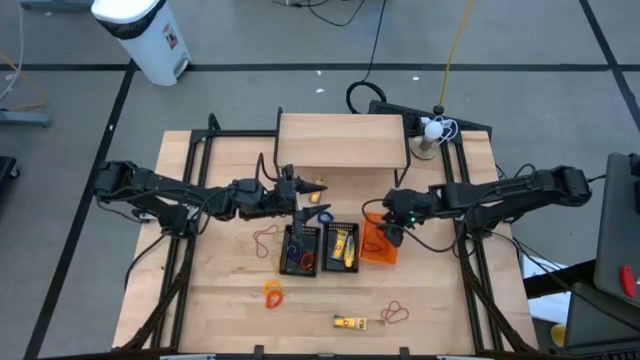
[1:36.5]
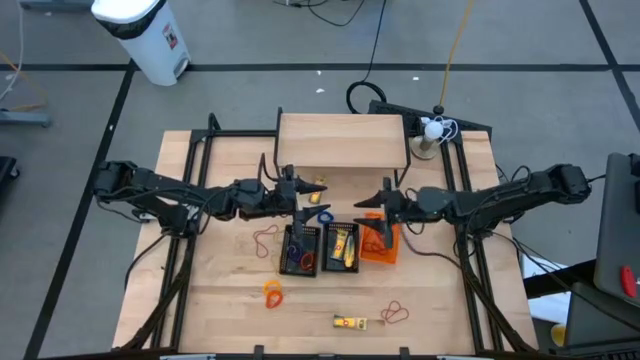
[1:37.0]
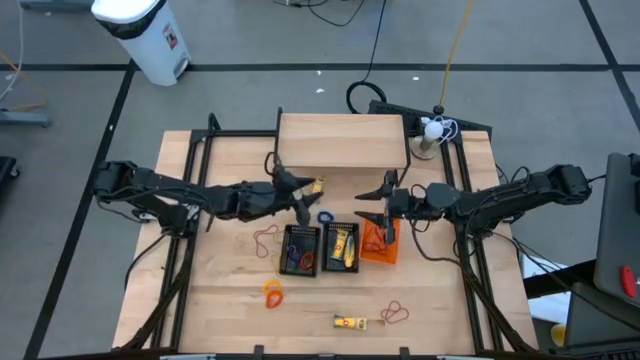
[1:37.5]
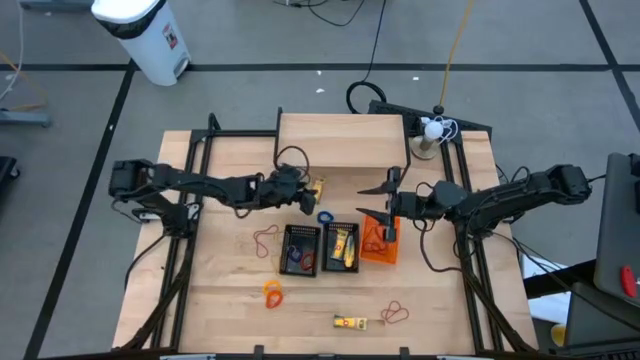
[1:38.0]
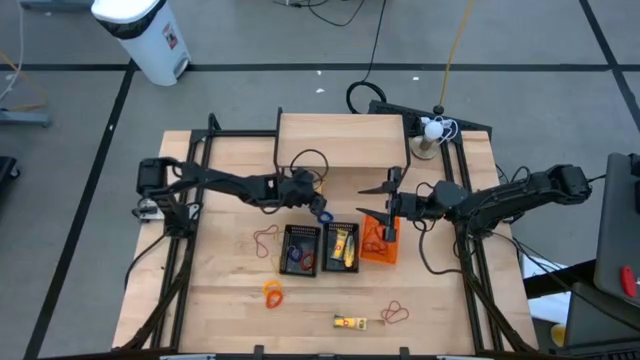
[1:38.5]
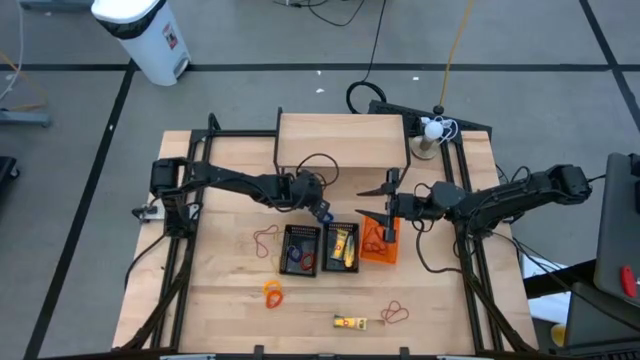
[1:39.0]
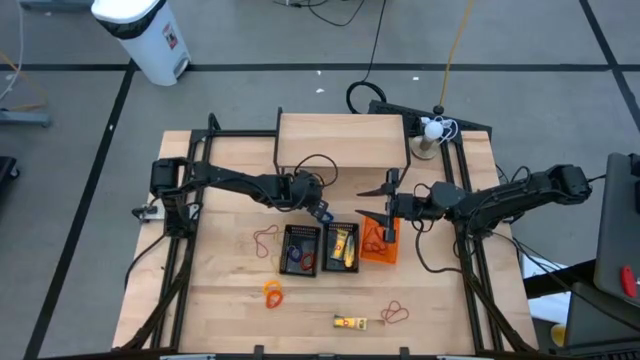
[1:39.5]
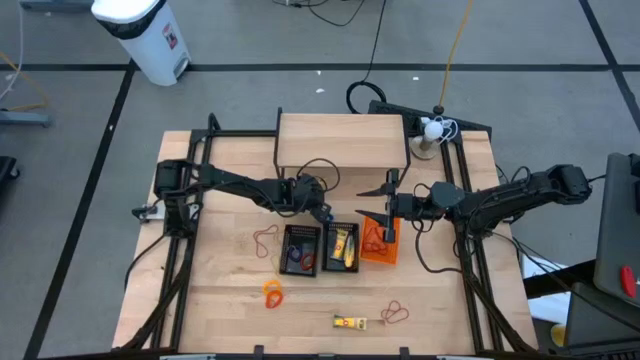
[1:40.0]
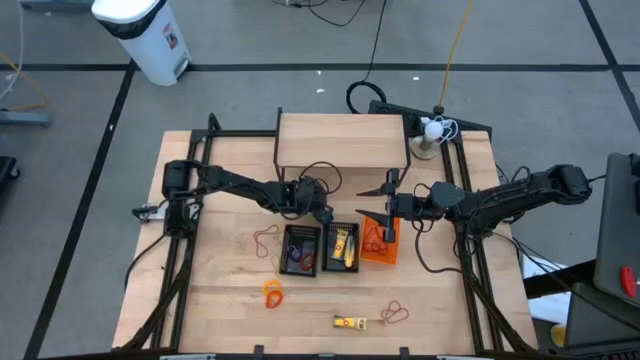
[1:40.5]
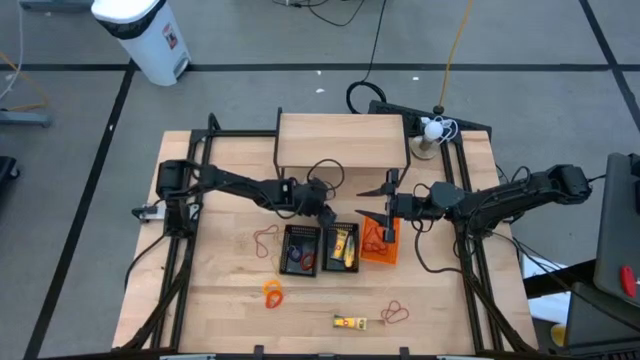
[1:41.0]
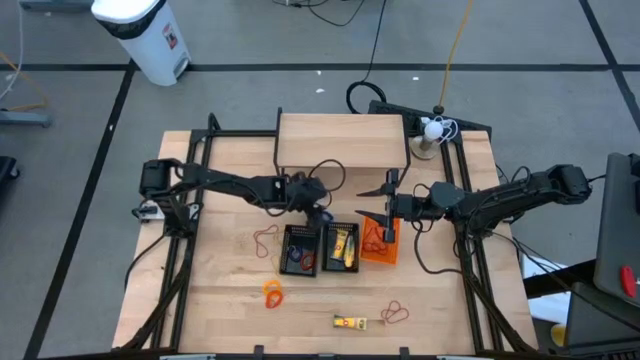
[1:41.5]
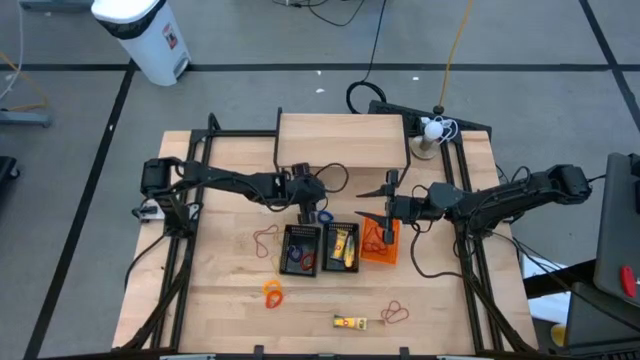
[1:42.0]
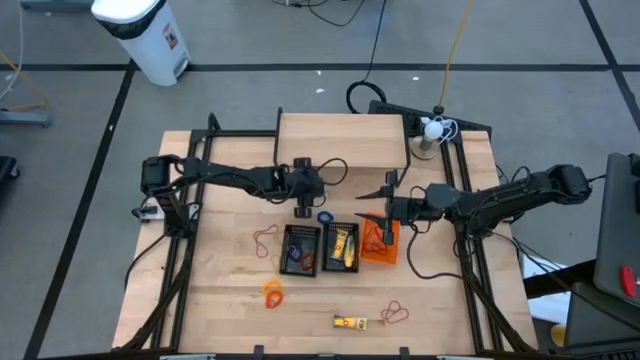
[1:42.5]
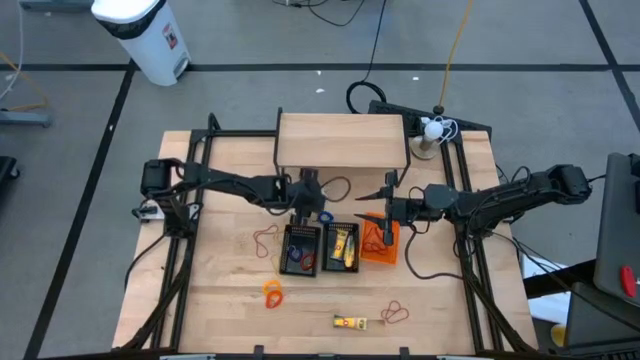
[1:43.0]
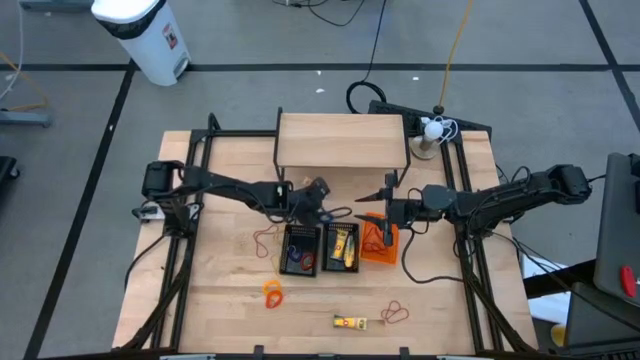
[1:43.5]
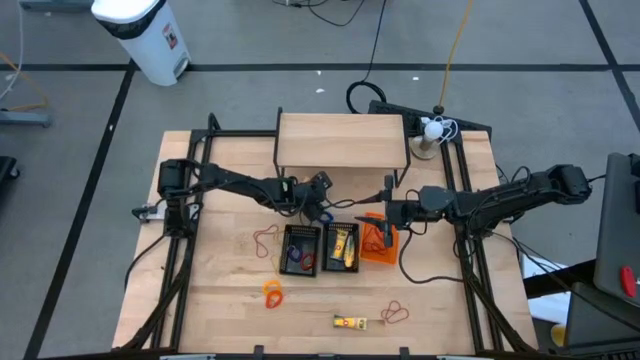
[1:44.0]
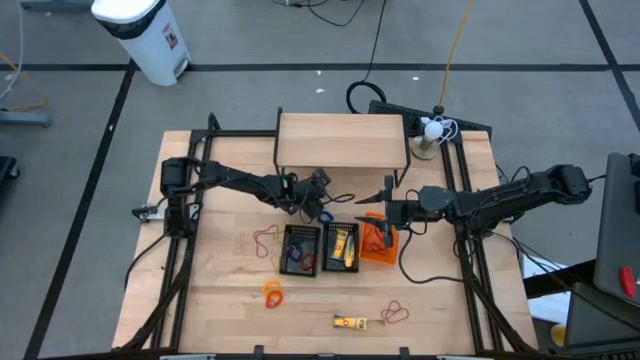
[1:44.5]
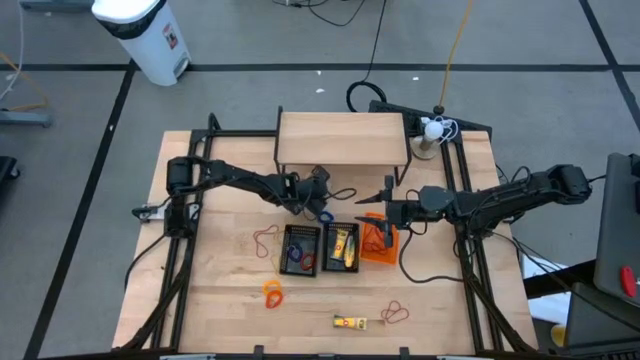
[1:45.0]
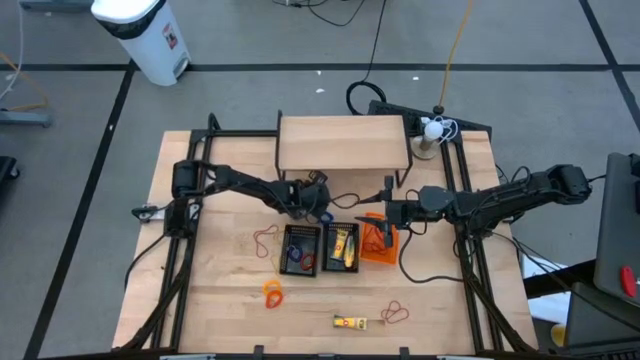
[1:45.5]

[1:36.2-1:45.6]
Task: Pick & Place Office Desk Supplies
Put the crayon box into the right black basket

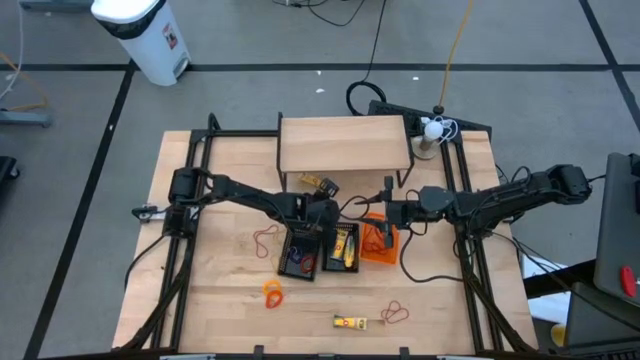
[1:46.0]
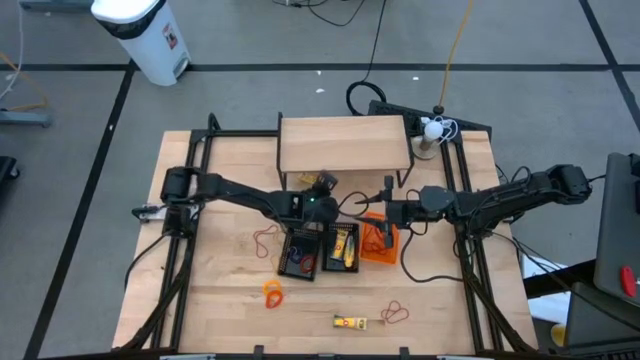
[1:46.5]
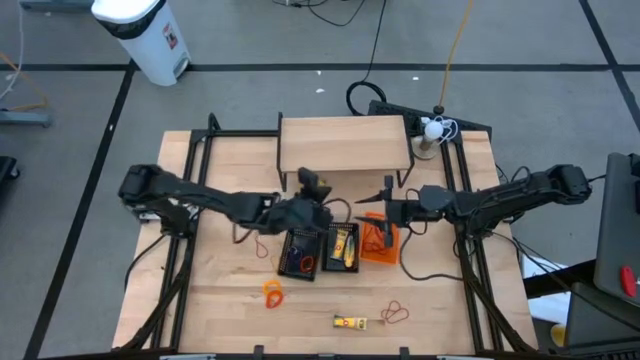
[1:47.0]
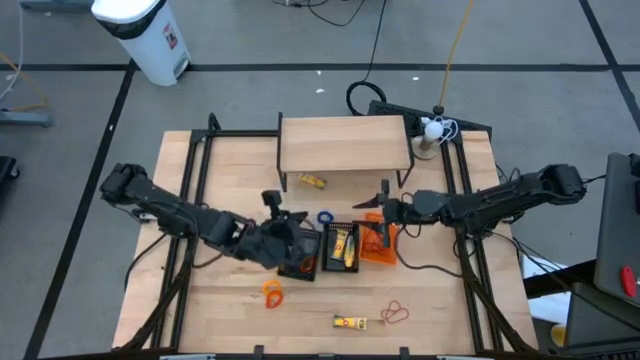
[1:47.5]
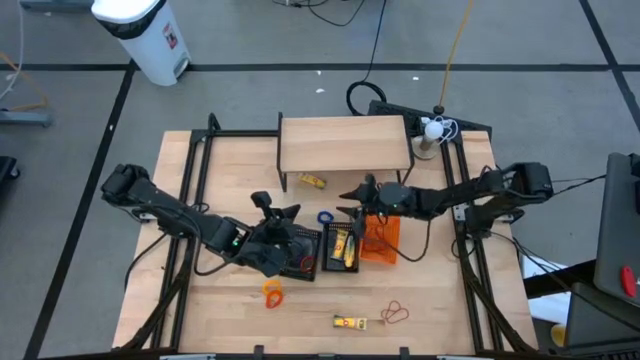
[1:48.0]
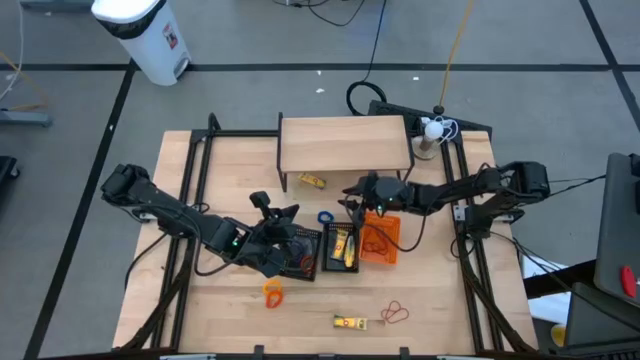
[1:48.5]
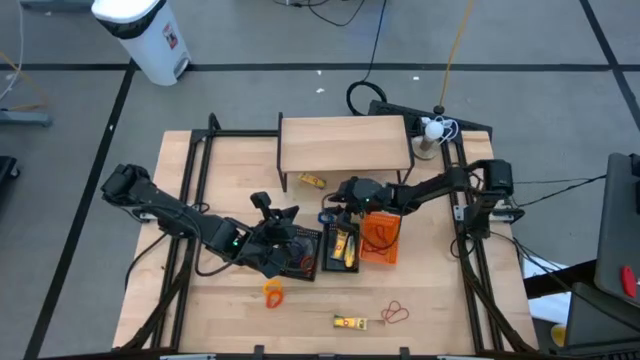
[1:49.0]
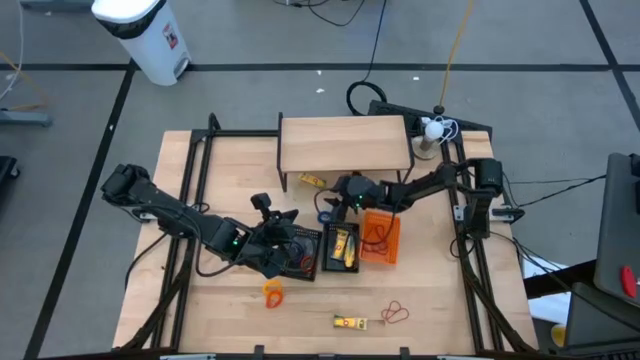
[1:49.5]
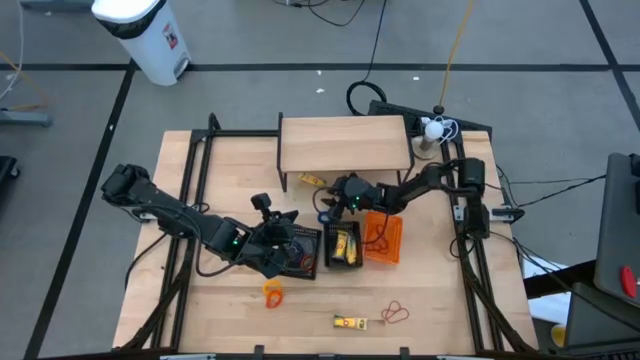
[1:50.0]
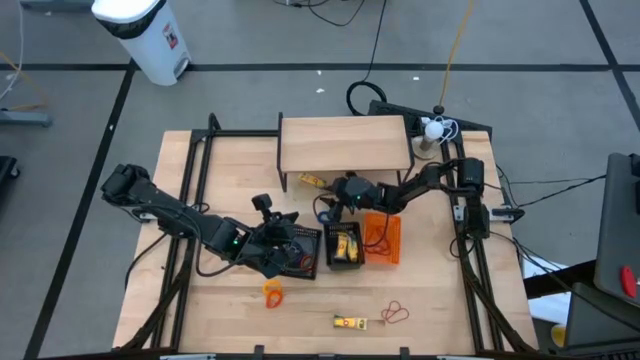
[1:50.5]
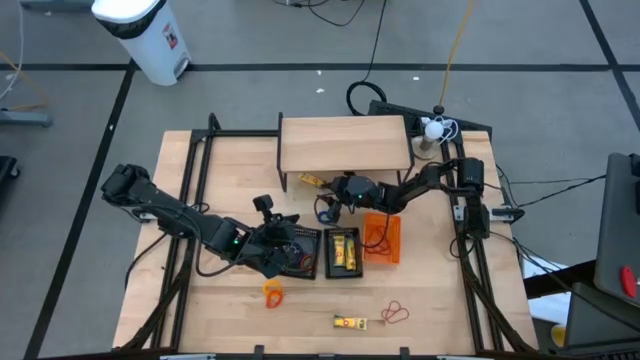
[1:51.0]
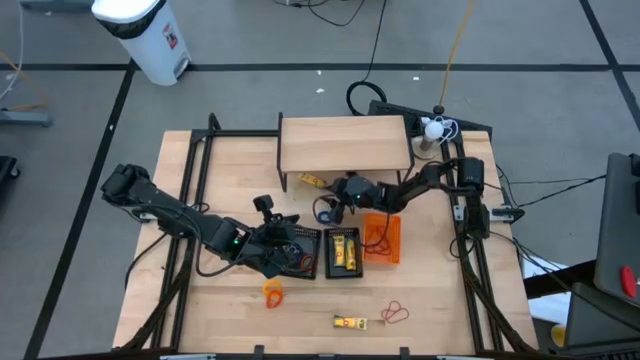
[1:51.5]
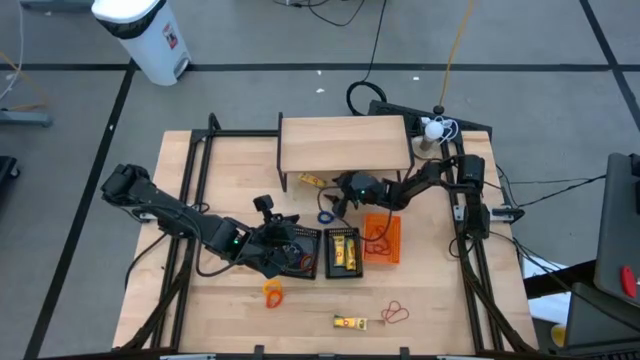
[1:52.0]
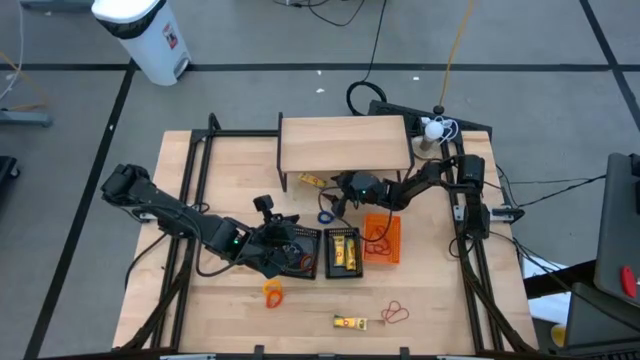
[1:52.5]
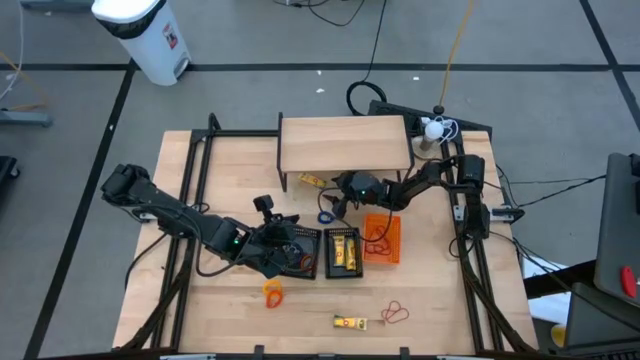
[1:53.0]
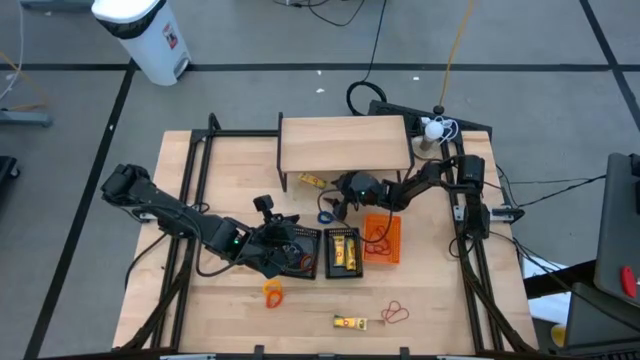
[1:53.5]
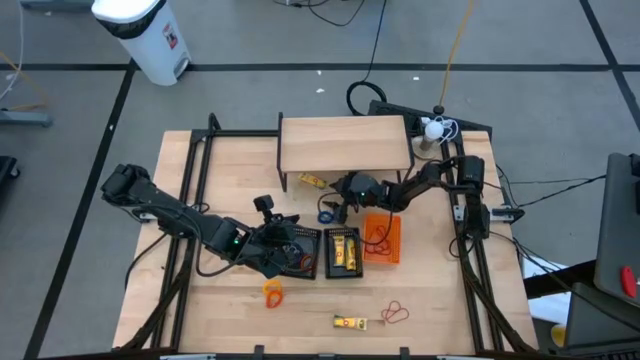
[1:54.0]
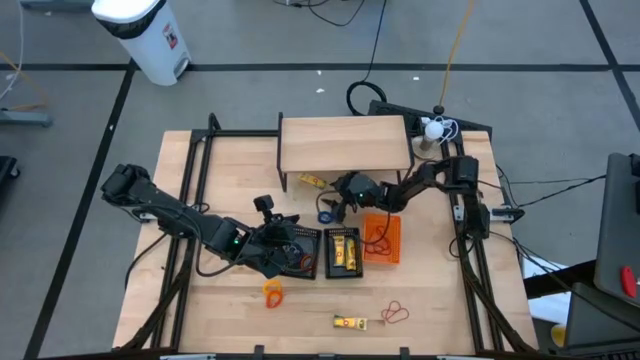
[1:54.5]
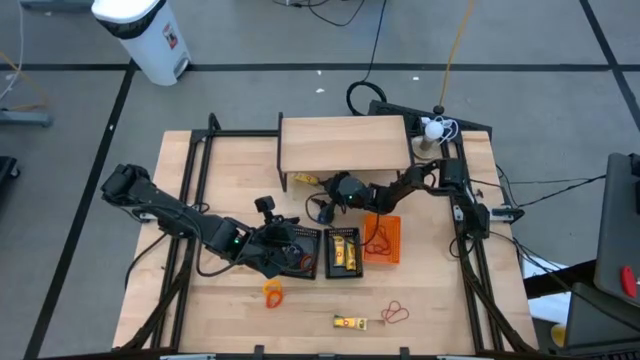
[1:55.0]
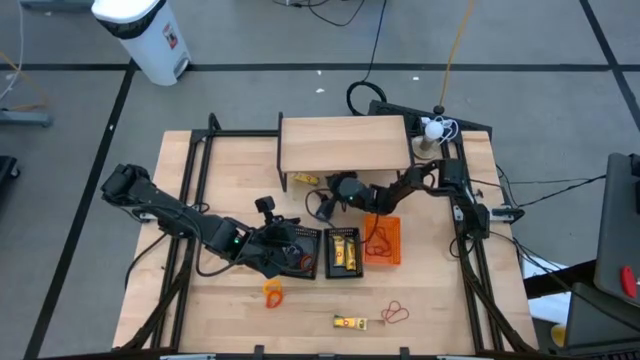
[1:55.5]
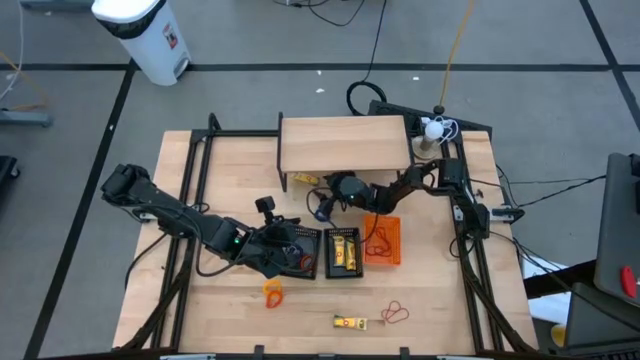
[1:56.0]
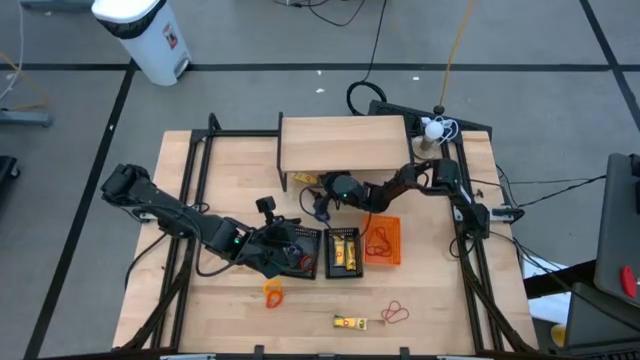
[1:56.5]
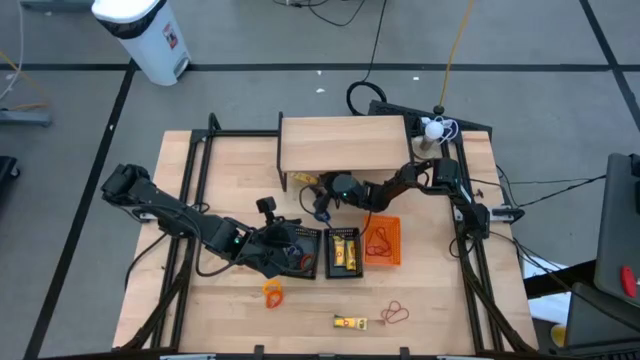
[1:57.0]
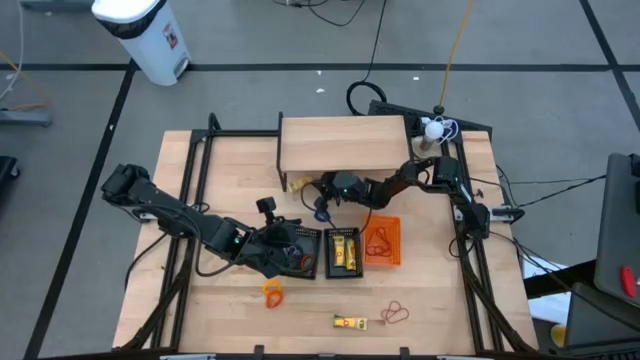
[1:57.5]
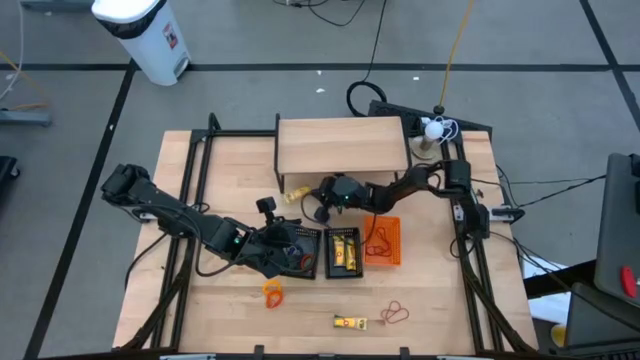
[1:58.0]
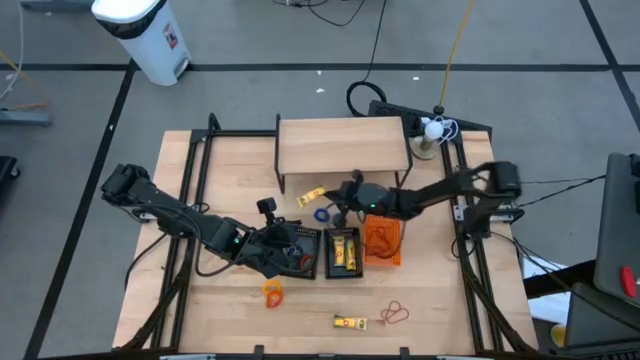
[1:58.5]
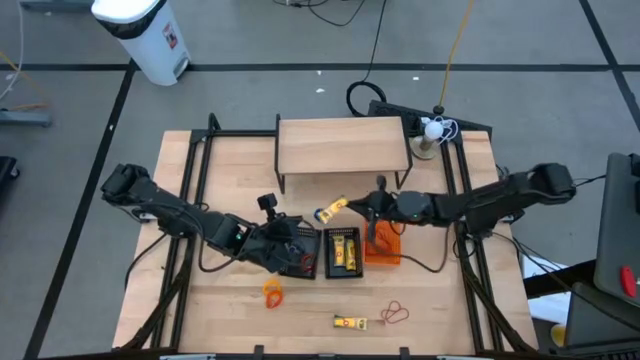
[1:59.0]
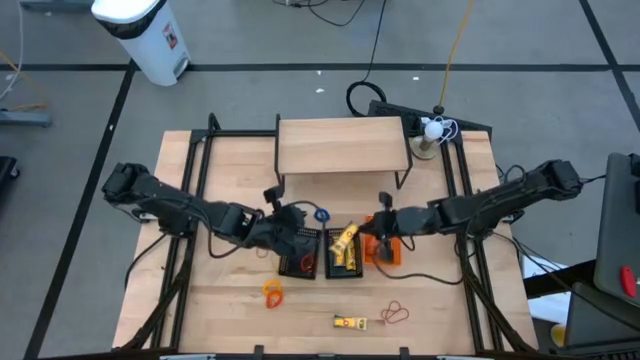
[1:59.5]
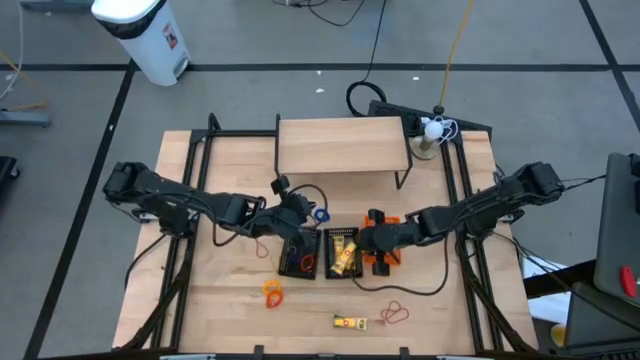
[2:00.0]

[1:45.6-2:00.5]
Put the crayon box into the right black basket
